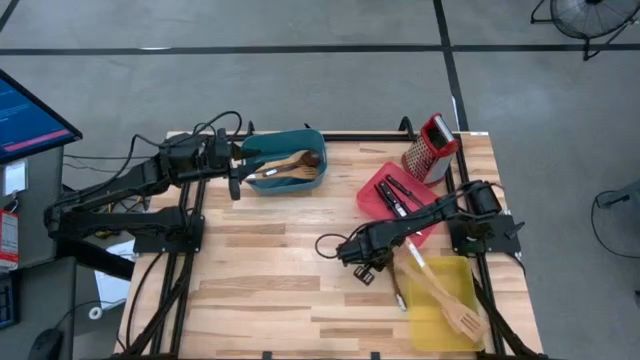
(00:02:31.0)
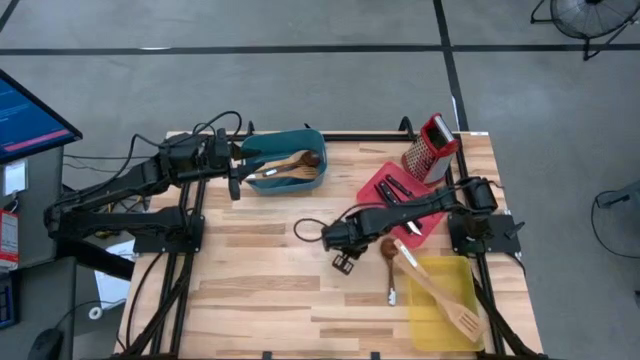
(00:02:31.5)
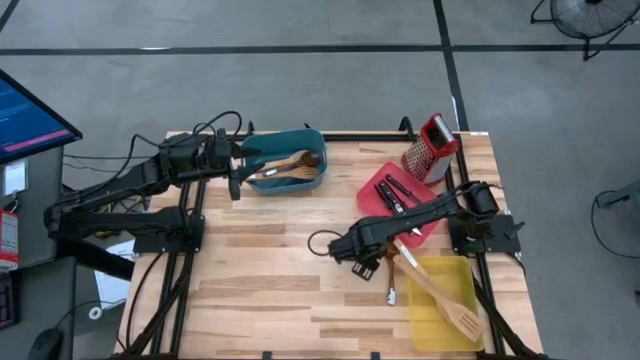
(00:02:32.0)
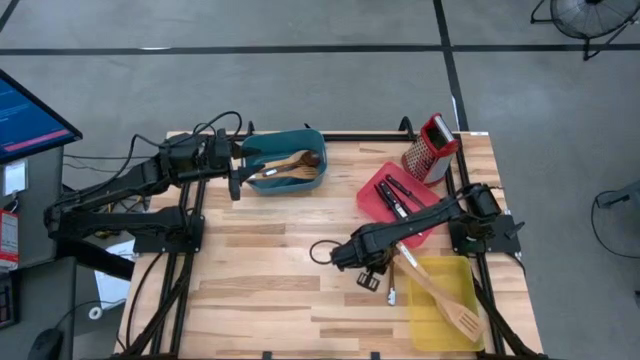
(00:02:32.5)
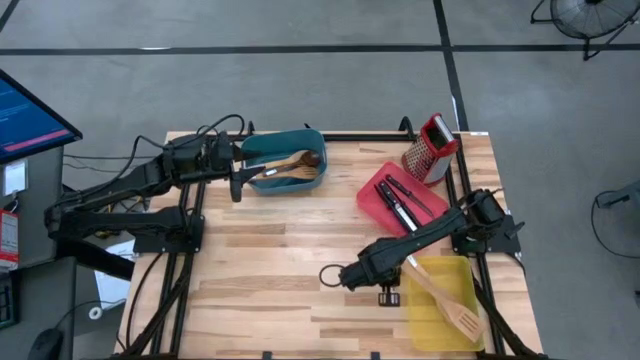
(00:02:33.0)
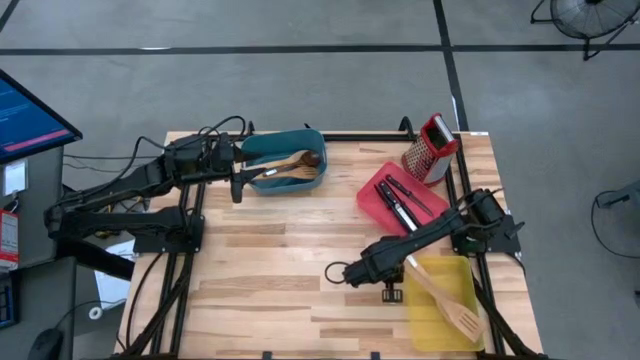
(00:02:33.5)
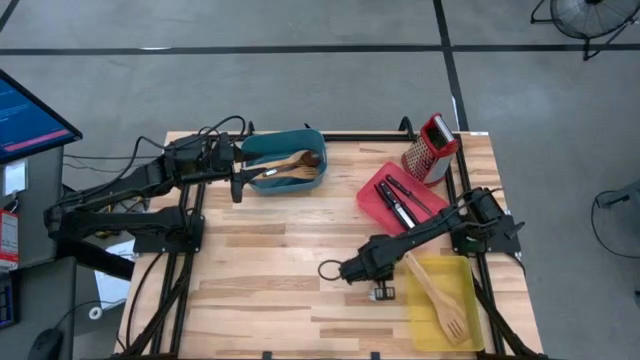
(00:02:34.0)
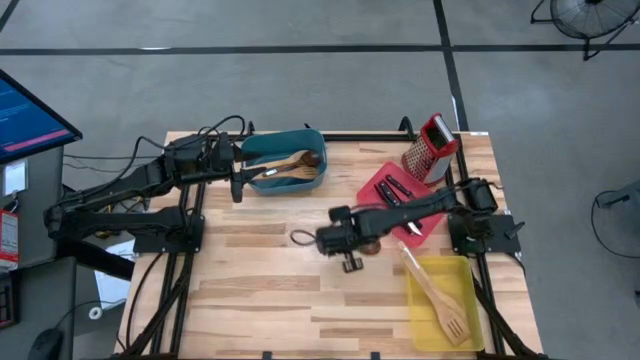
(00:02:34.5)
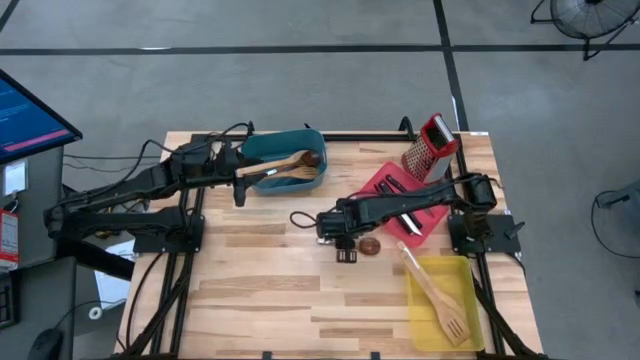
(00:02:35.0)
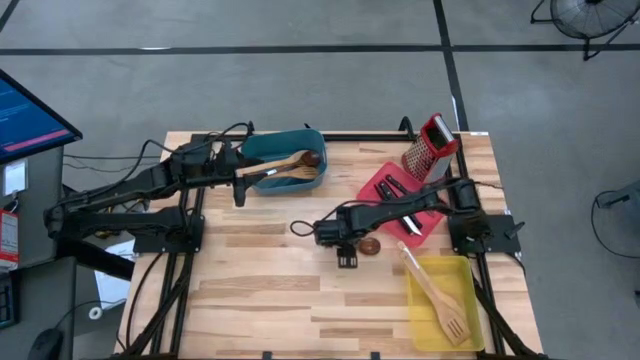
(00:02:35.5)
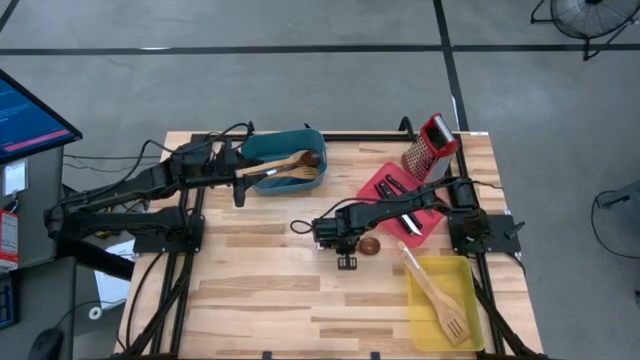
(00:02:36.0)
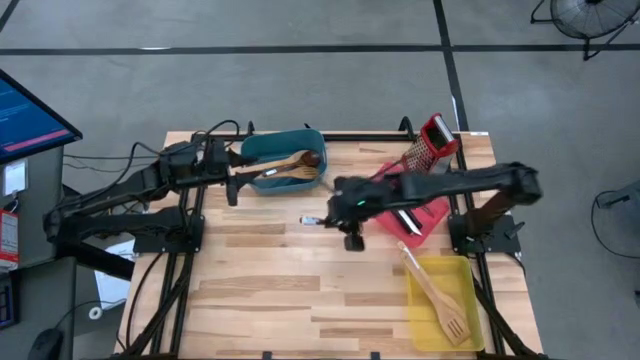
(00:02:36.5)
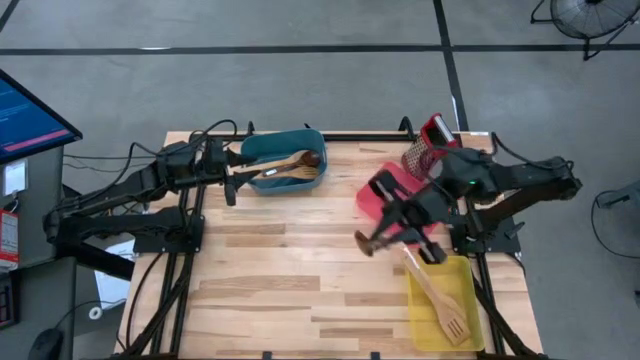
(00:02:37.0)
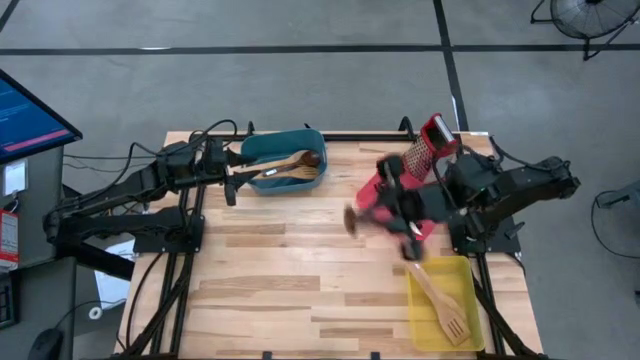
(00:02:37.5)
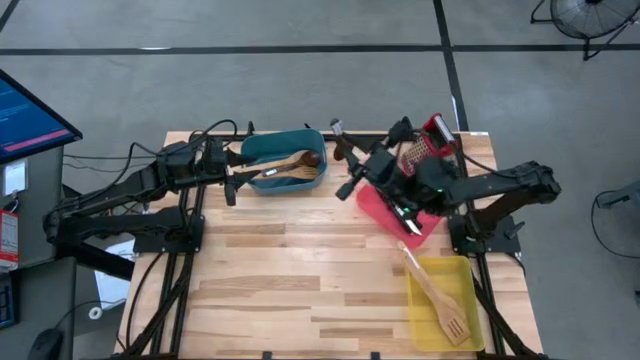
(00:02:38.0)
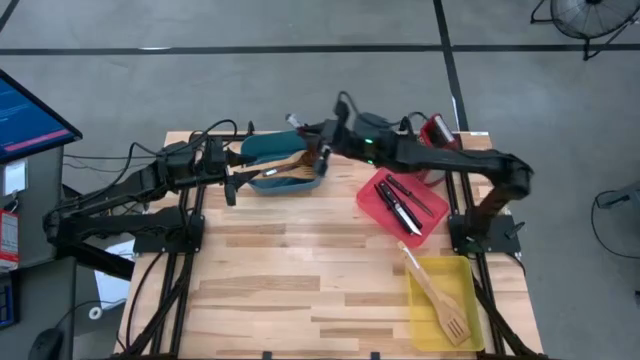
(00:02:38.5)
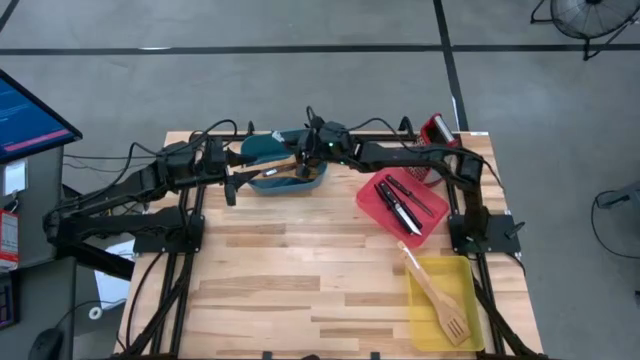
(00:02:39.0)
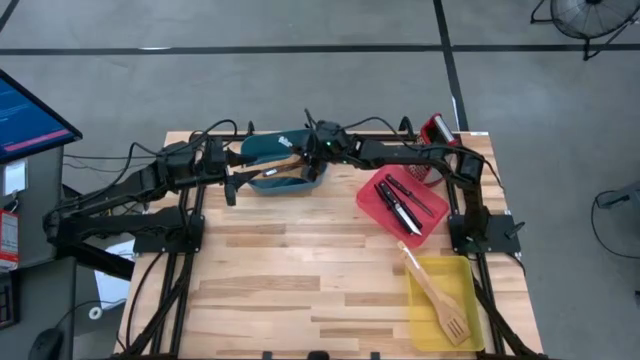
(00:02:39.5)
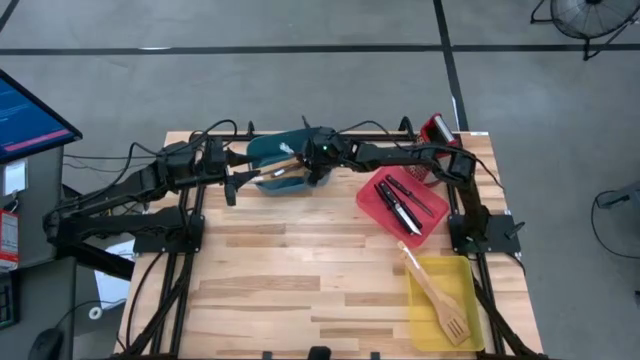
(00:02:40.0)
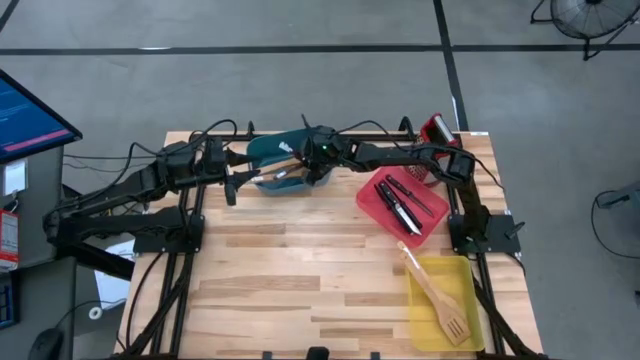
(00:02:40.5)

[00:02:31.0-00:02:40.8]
Task: Pick & Place Kitchen Items
Put the wooden serving spoon into the blue bin

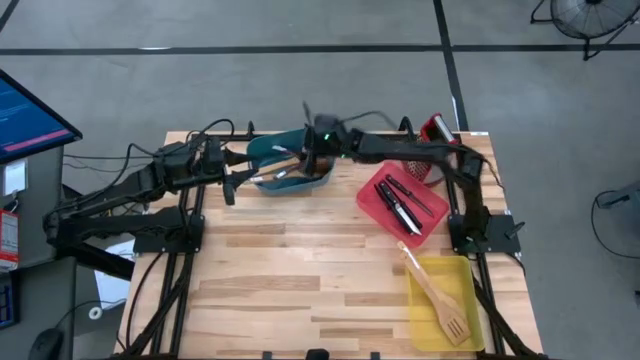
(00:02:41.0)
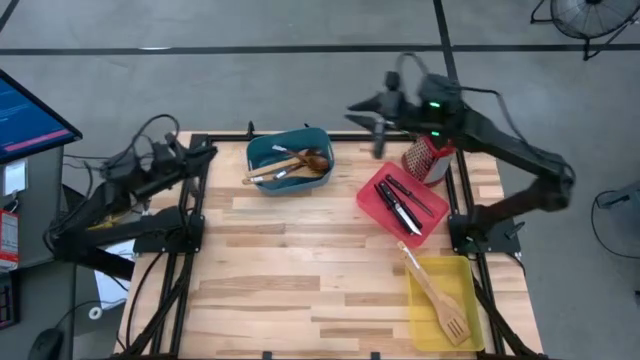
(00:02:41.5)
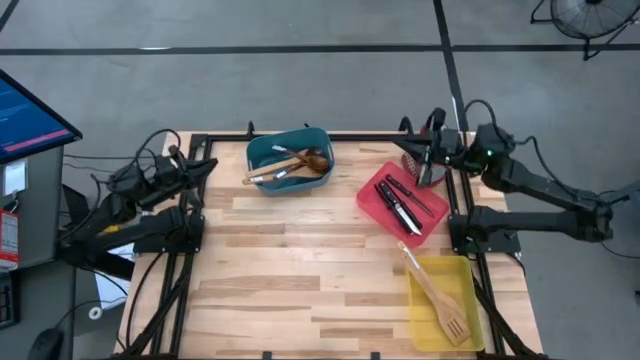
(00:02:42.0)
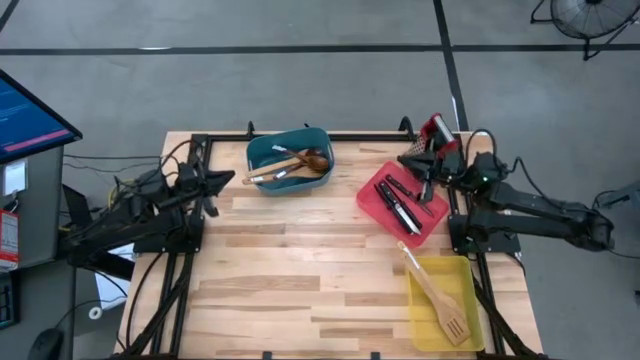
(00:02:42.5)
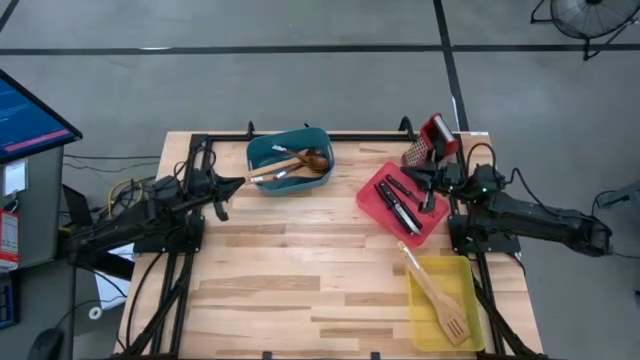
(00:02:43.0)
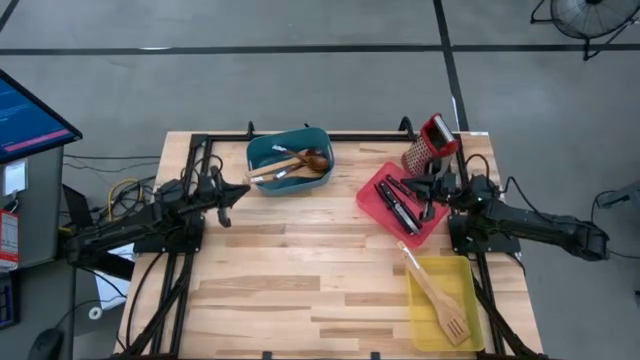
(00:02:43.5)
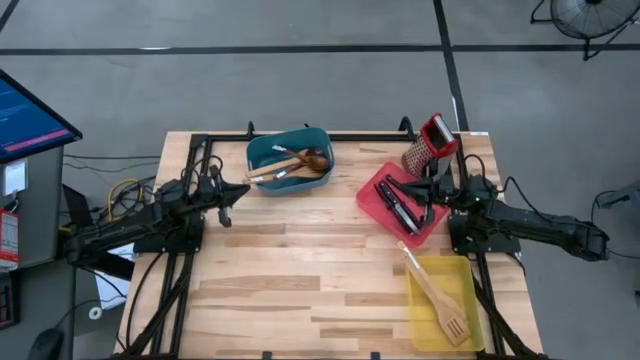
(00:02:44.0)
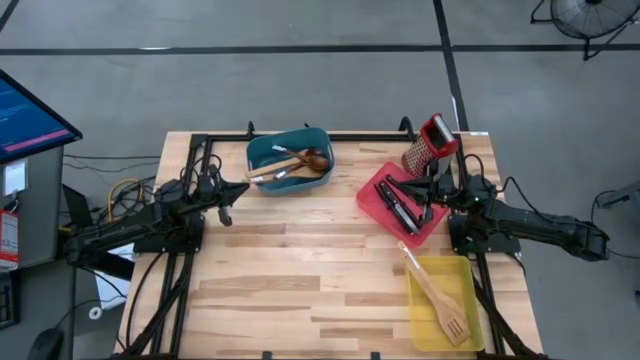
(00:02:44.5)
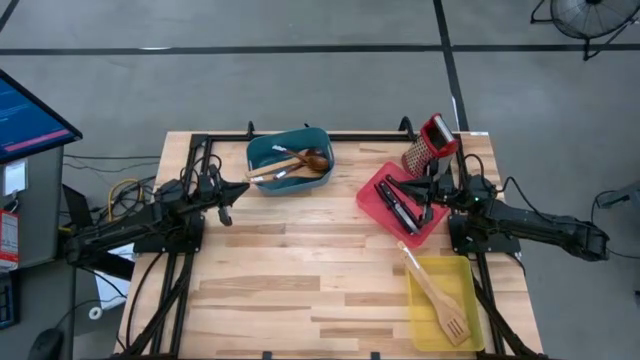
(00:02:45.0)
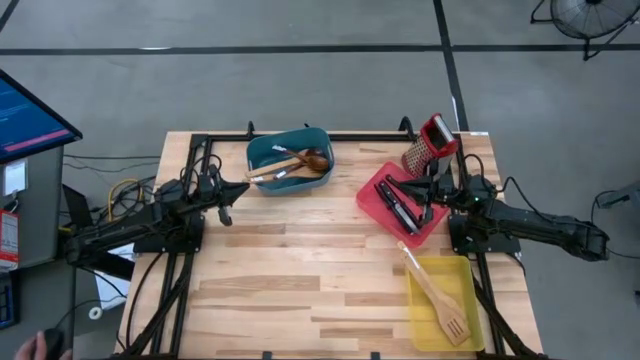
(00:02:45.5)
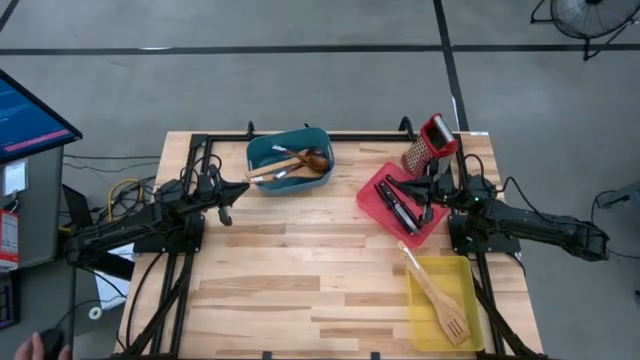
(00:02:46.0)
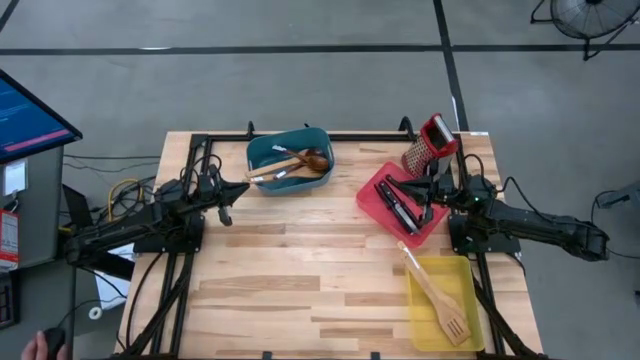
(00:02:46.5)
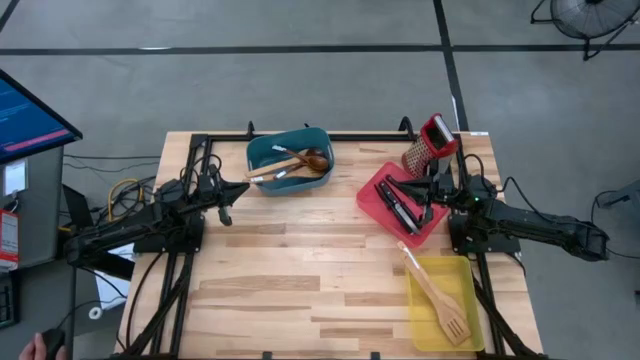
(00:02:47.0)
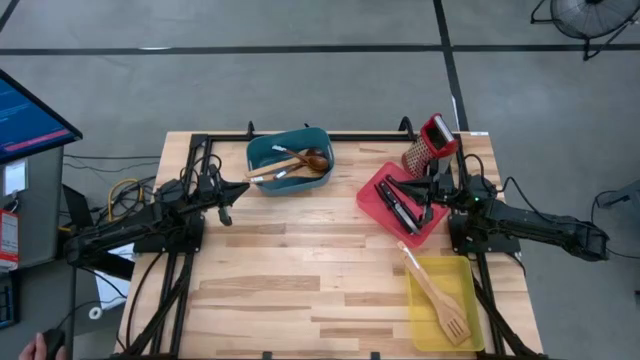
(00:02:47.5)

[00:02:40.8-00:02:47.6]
Return to Home Position

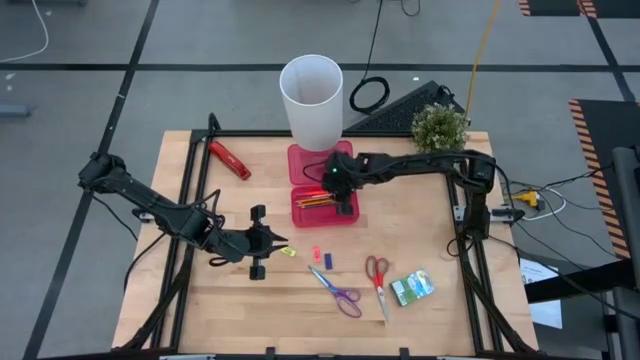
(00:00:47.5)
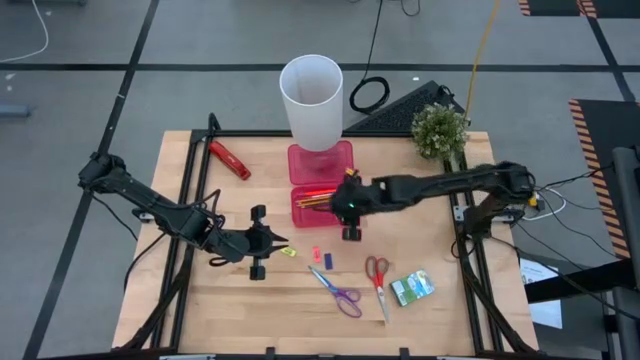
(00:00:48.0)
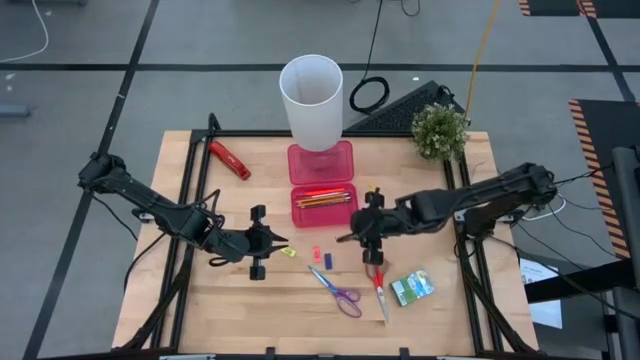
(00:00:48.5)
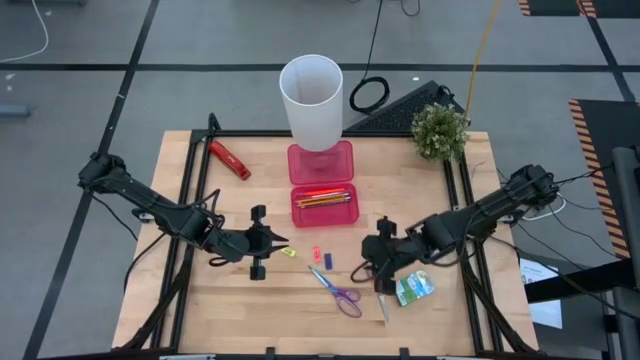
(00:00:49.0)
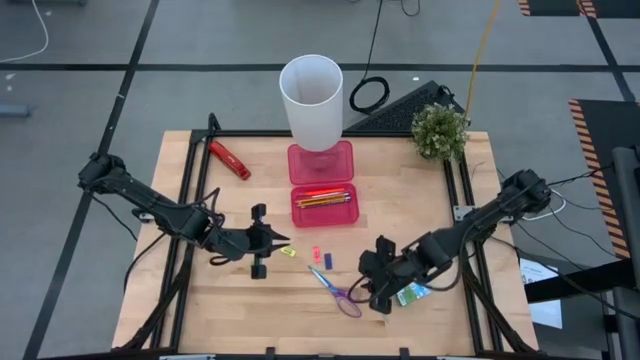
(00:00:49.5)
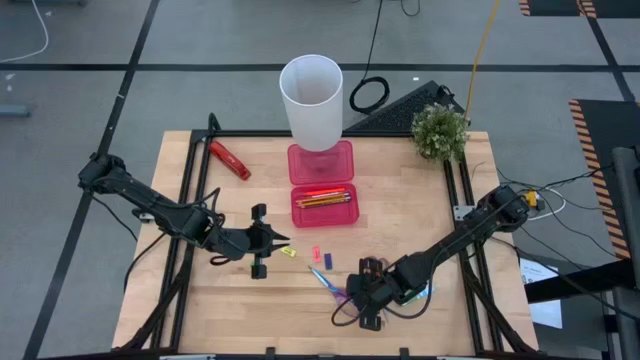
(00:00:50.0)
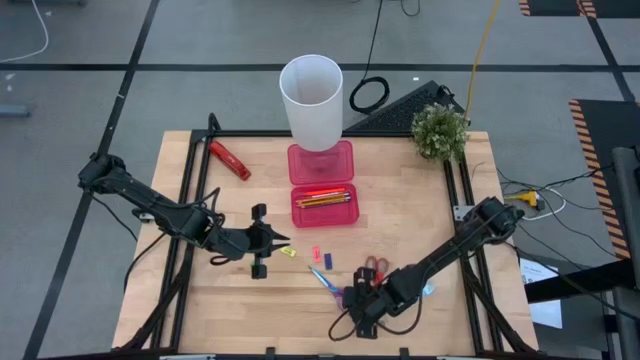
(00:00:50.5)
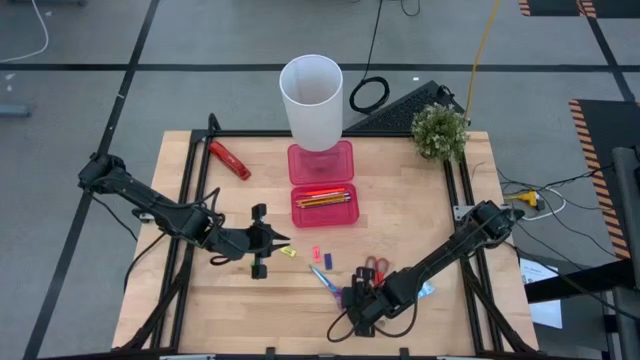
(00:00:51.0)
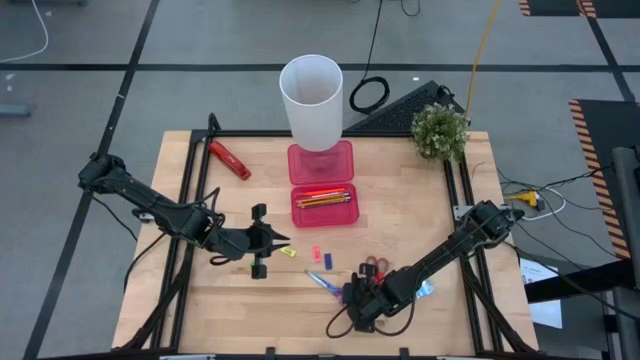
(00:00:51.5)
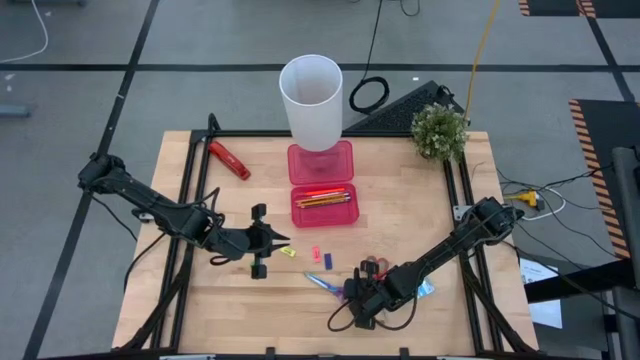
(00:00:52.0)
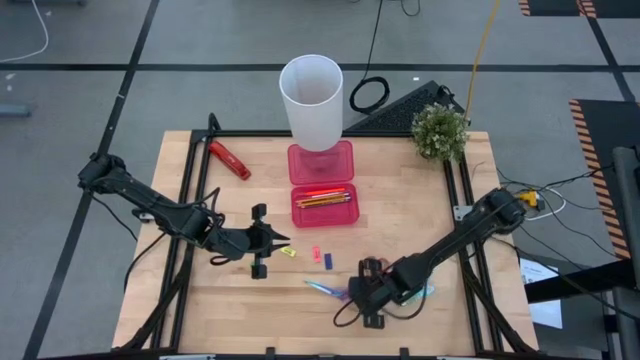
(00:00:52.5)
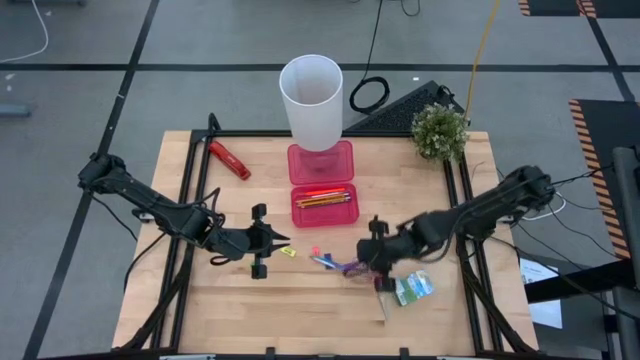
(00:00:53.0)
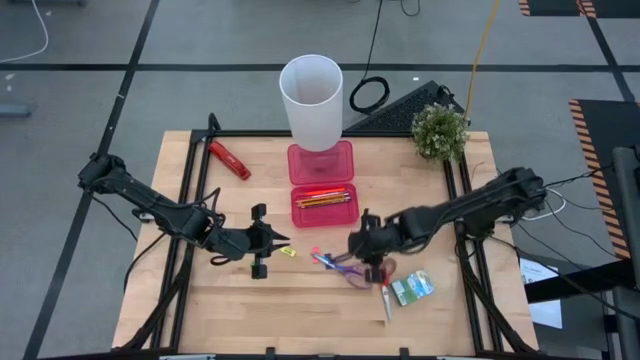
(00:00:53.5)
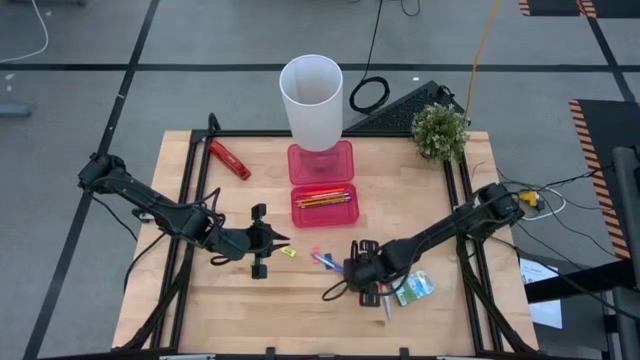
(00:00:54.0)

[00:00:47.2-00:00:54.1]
Task: Pack school essentials
Put the purple scissors into the pink supply box
